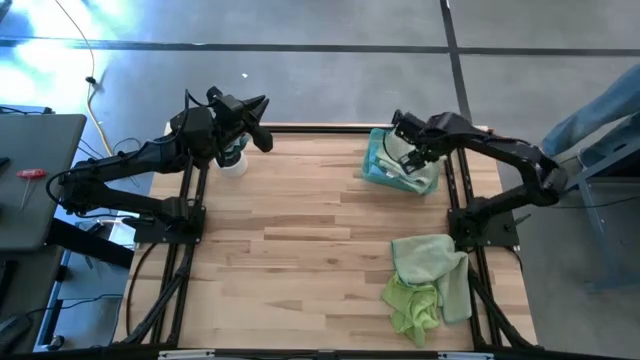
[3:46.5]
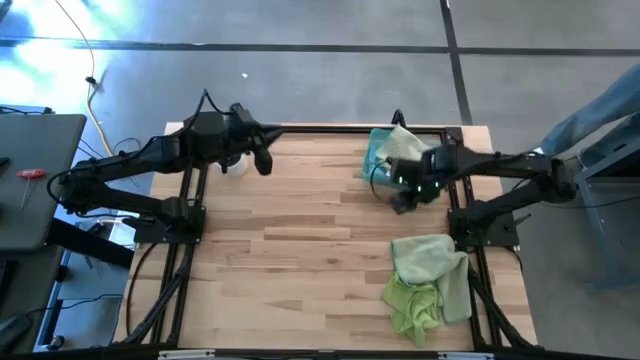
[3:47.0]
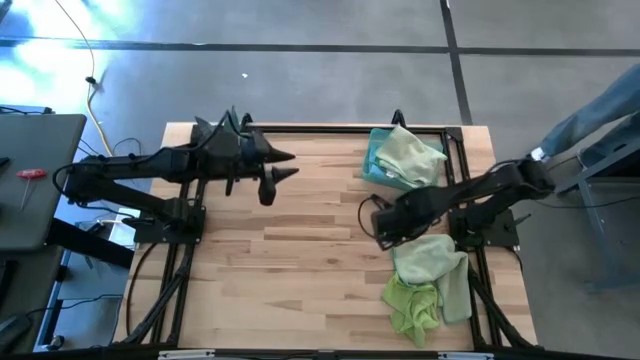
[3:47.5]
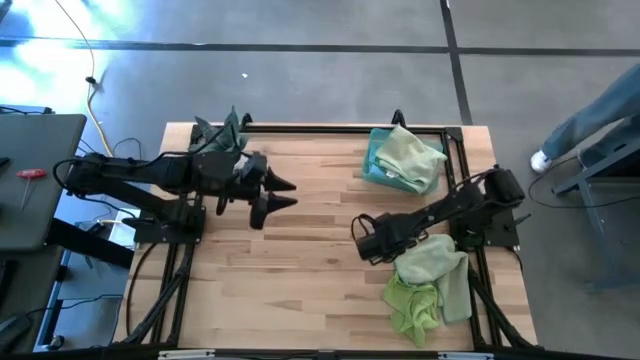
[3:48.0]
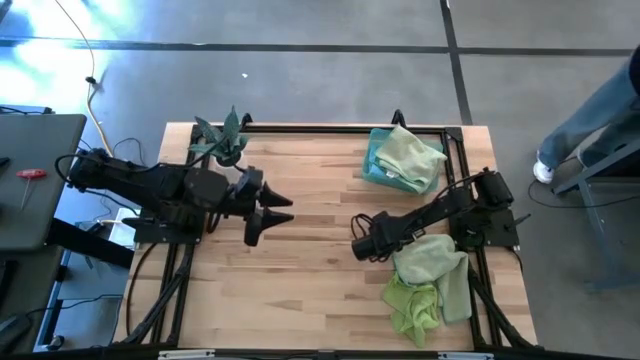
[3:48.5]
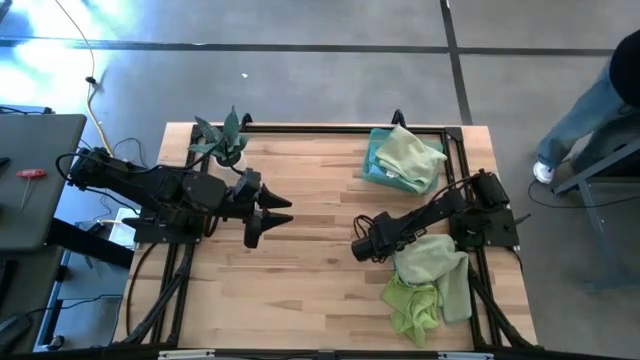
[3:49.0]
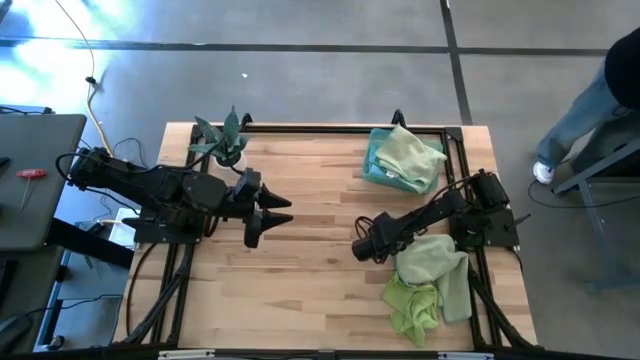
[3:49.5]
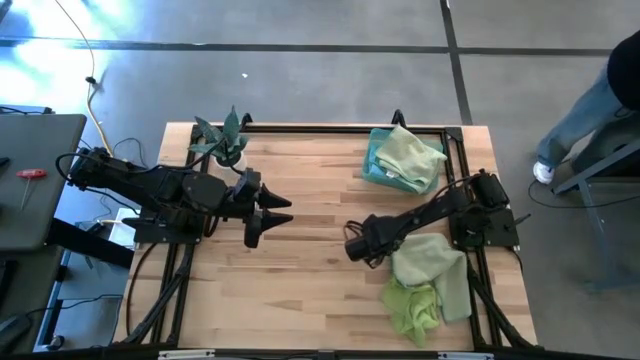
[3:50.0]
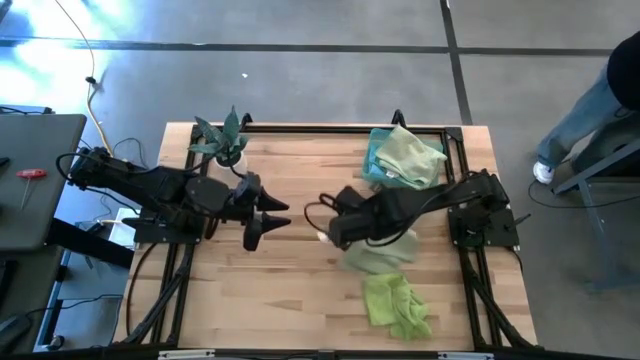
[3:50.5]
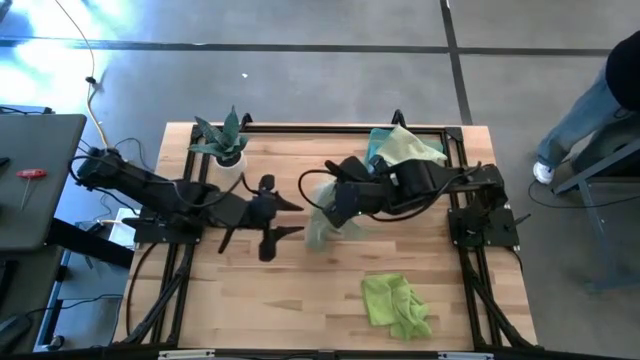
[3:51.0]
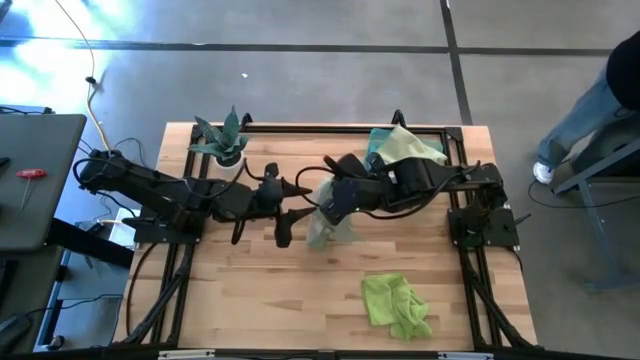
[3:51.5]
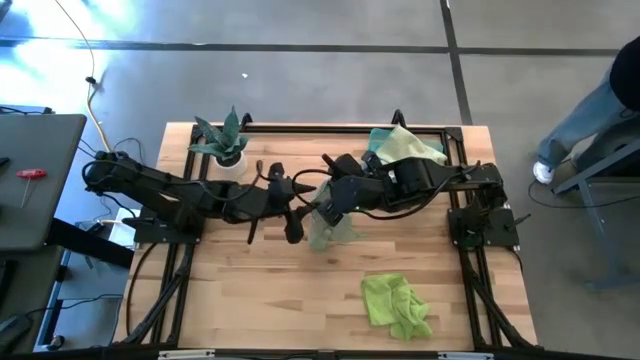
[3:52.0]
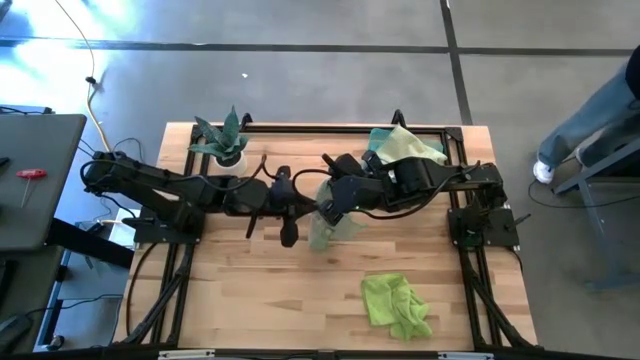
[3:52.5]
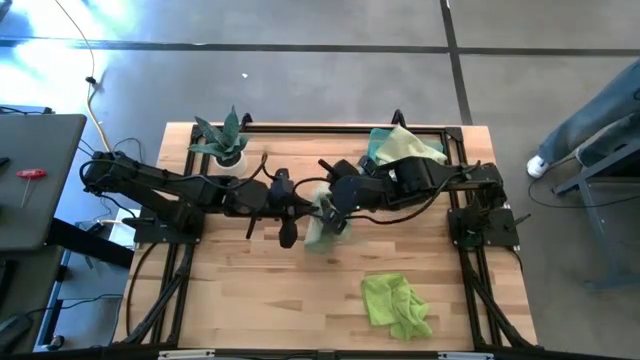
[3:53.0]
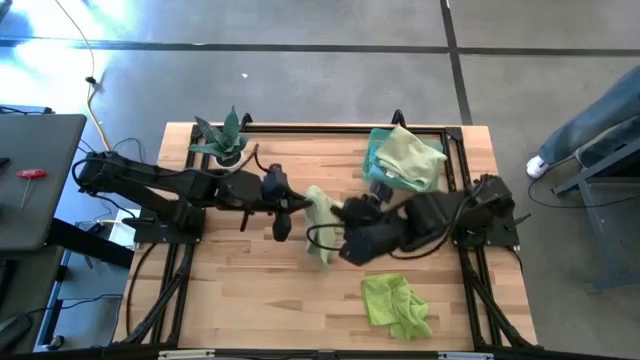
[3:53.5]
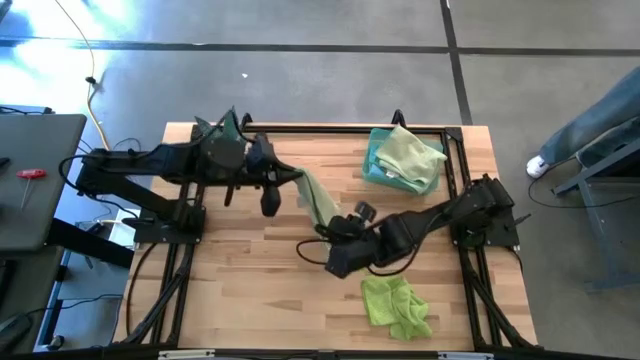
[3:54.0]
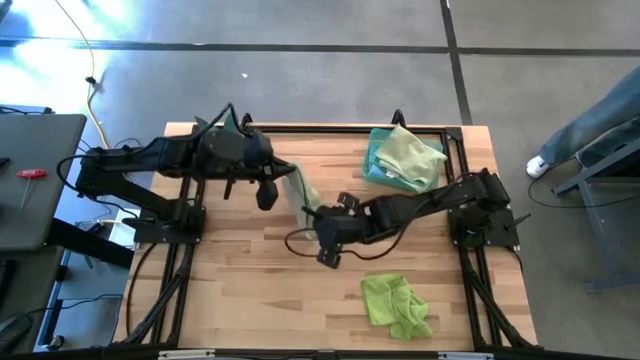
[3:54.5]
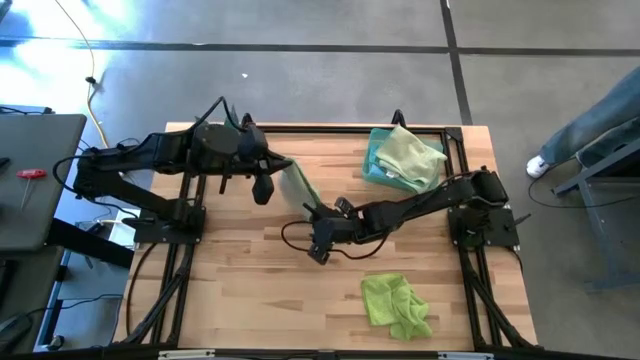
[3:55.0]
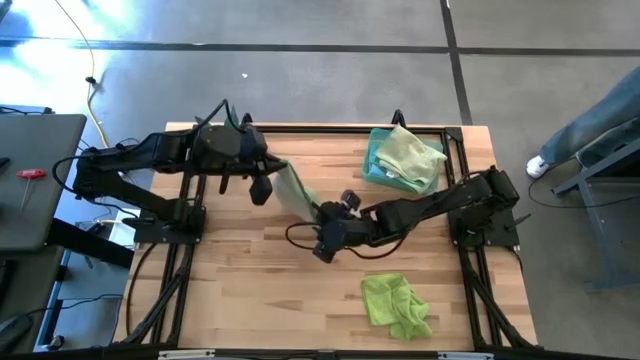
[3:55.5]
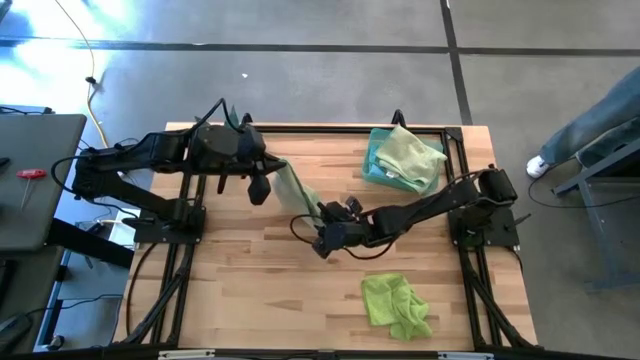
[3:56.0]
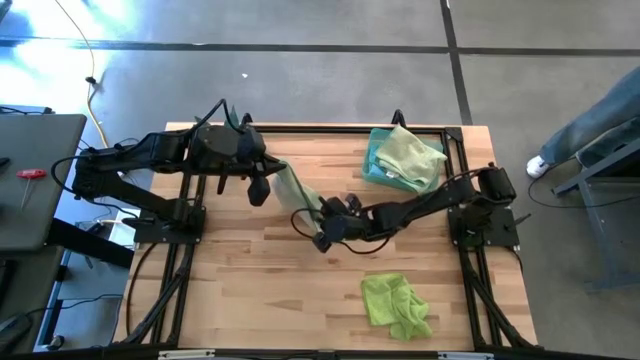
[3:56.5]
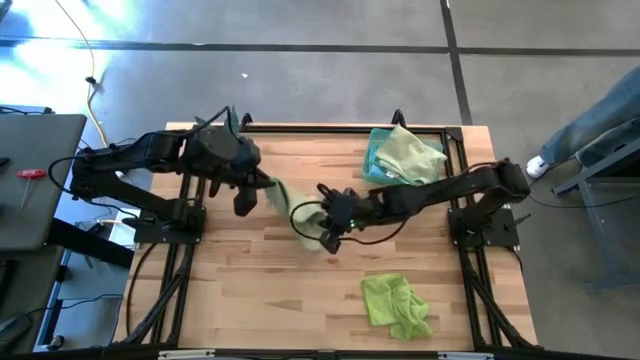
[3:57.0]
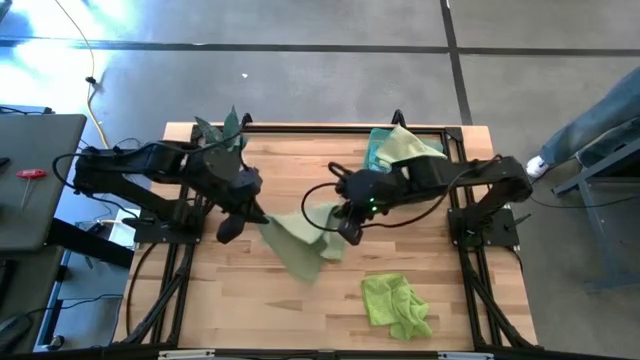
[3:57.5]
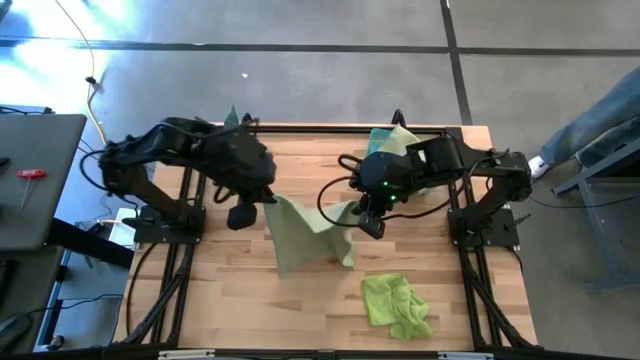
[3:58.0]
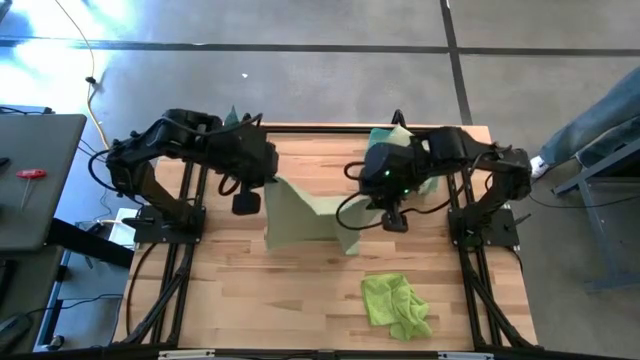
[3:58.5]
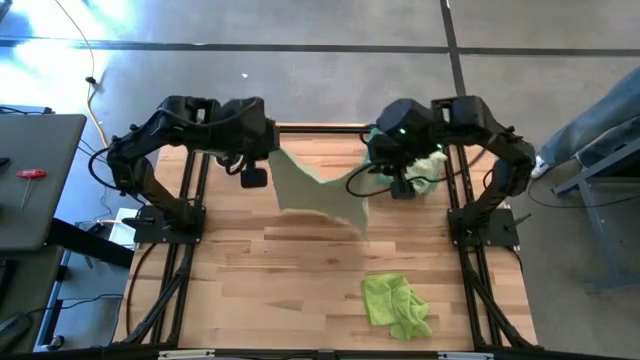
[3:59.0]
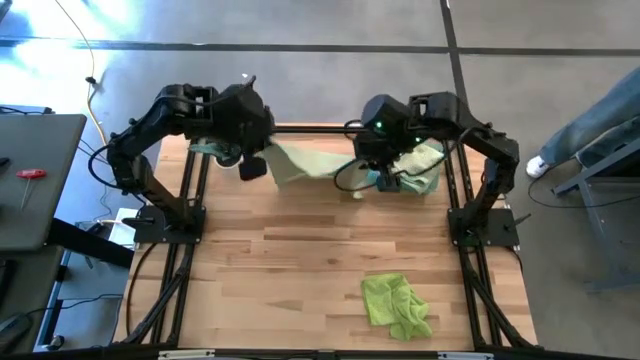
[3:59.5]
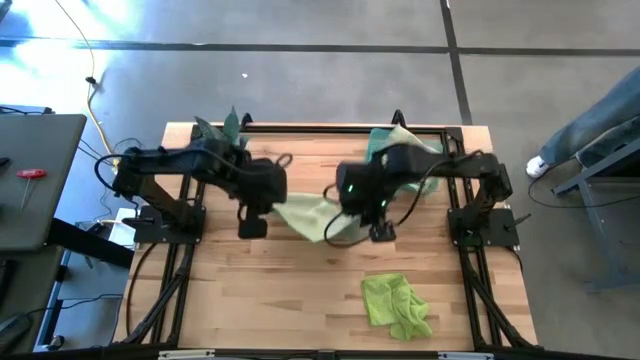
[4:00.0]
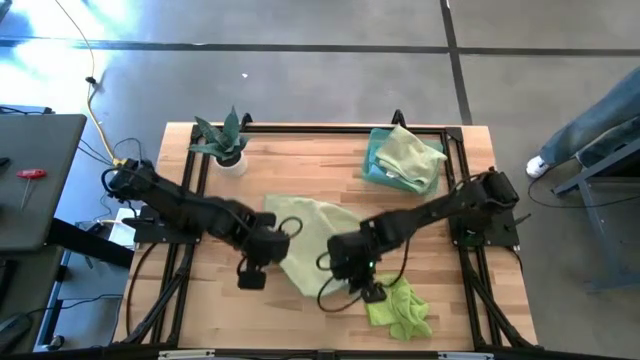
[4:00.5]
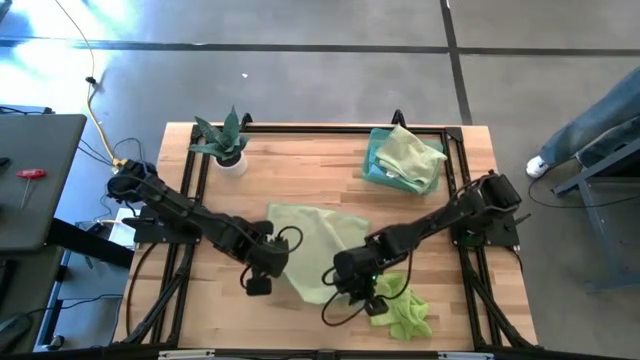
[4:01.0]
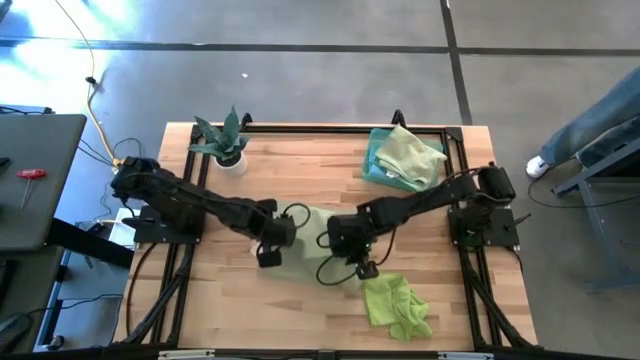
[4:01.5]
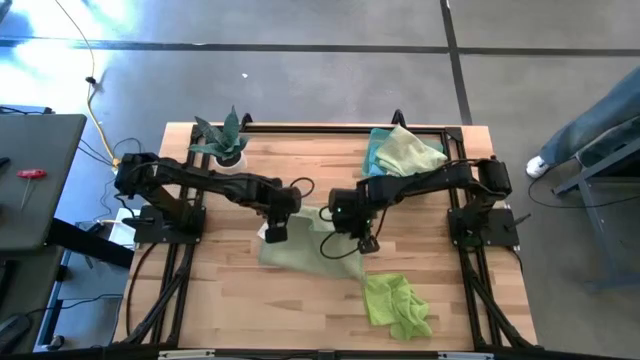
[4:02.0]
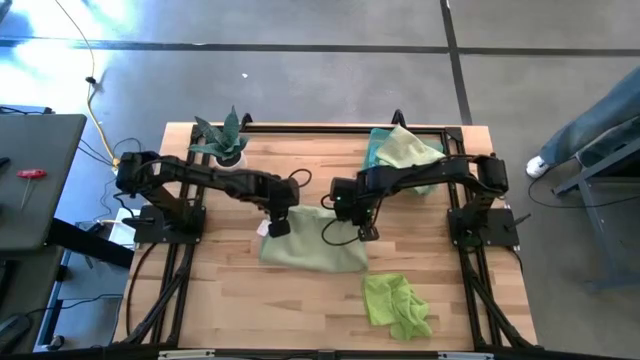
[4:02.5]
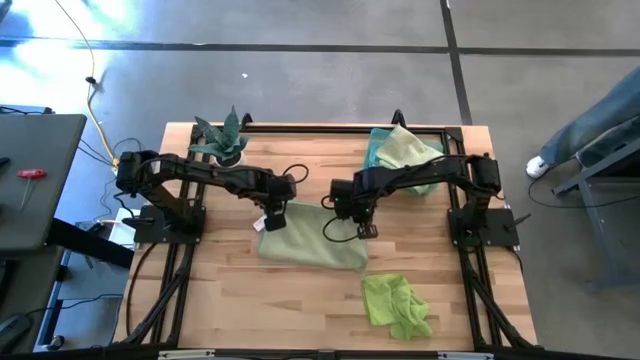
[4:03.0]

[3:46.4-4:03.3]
Task: Fold microfiber towels
Fold the green microfiber cloth

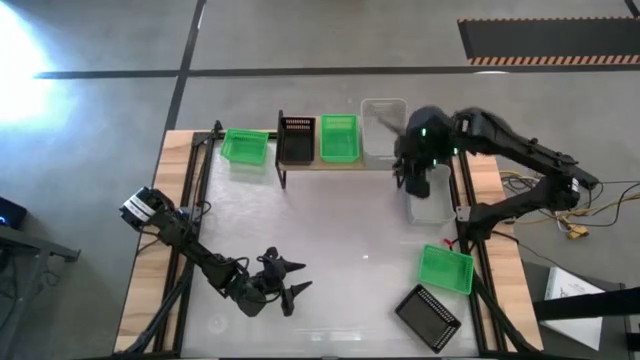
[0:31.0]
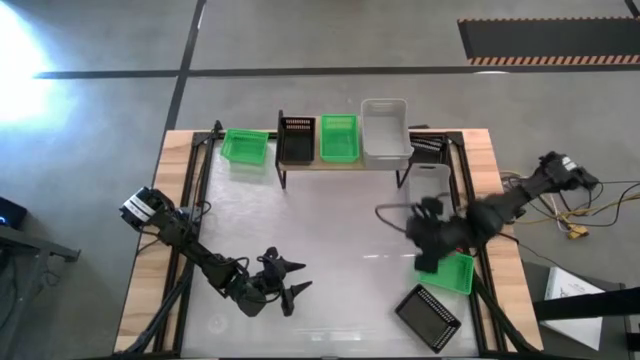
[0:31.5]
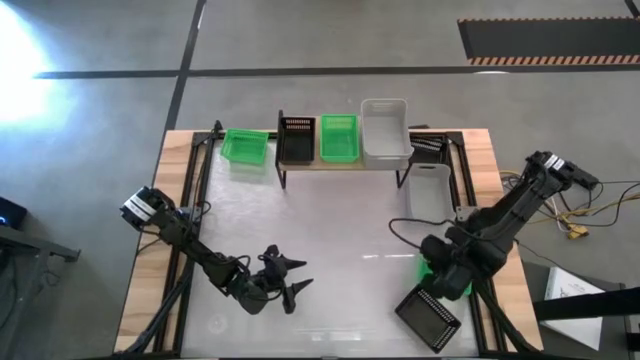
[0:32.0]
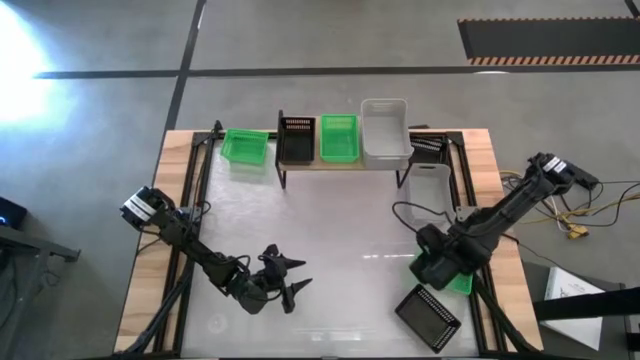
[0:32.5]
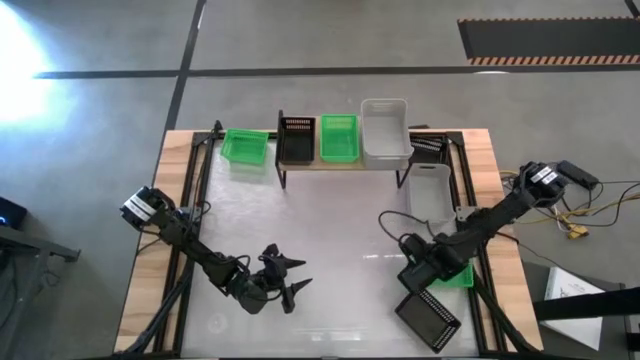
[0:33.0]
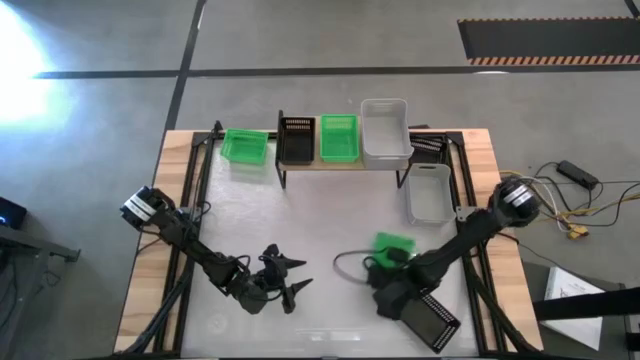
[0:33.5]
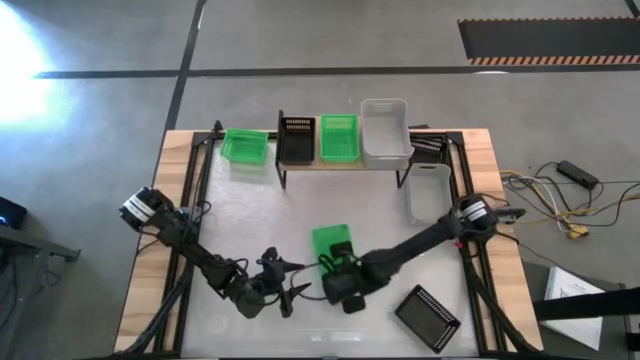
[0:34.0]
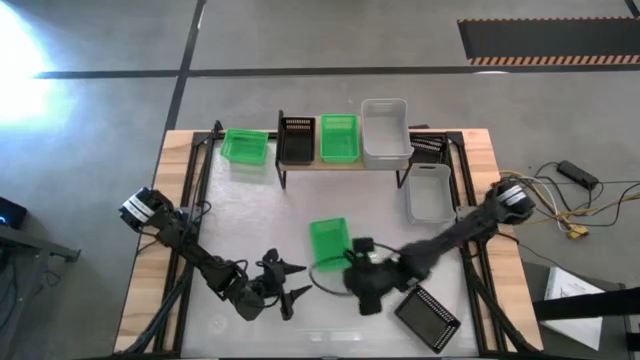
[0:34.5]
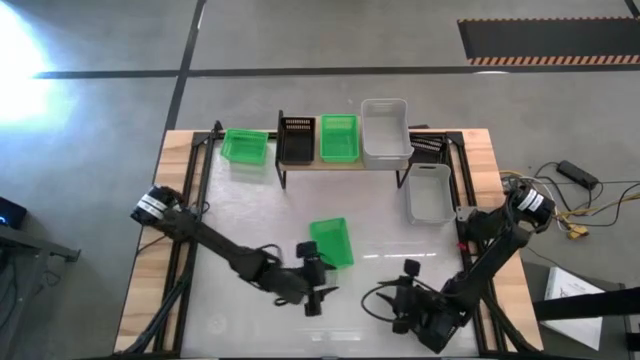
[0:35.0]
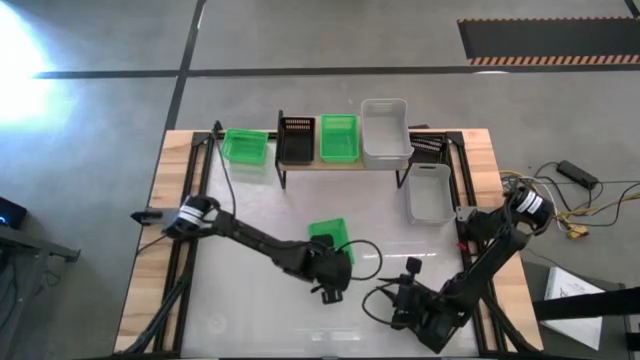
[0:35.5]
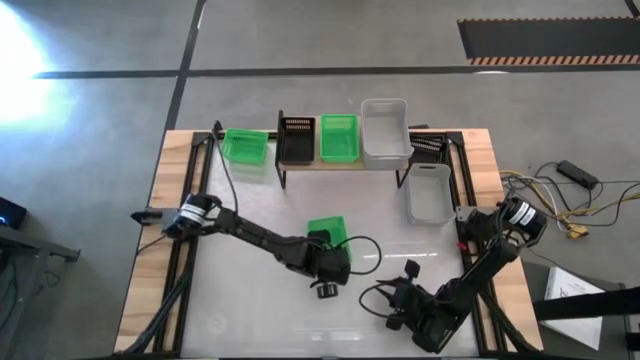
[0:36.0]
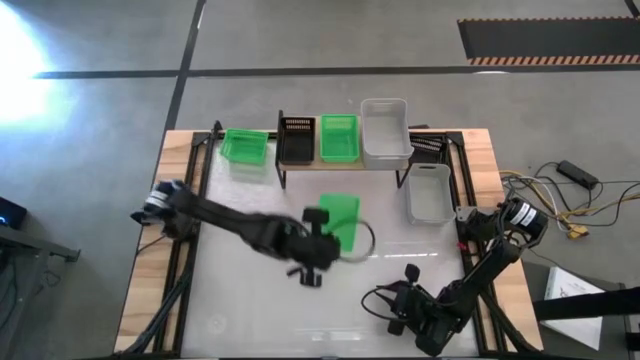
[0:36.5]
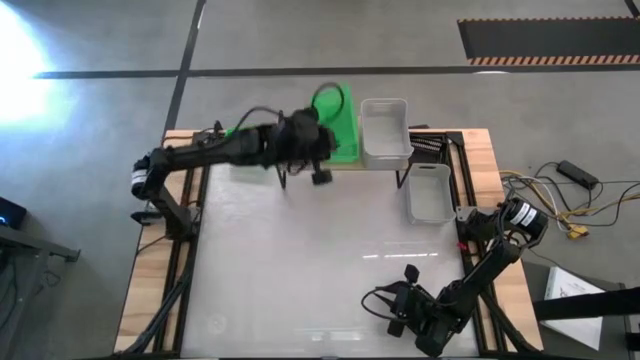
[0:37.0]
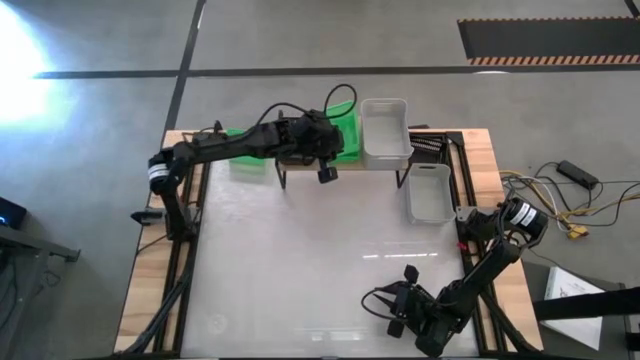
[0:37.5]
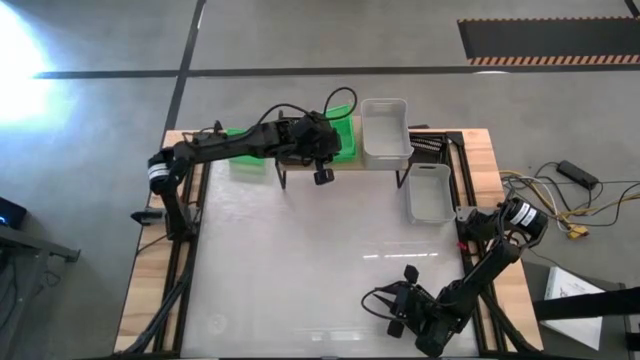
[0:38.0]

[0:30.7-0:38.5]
Task: Stack baskets on shelf by color
Stack the right green bin on top of the green bin on the shelf
